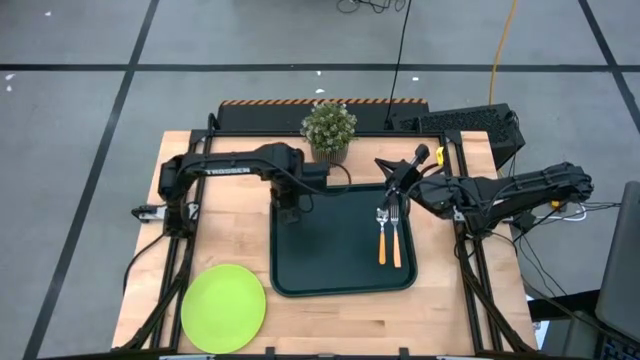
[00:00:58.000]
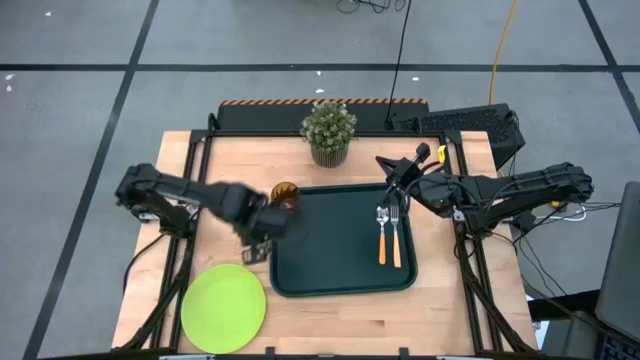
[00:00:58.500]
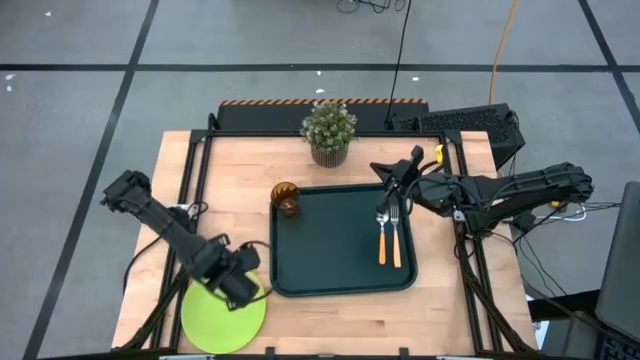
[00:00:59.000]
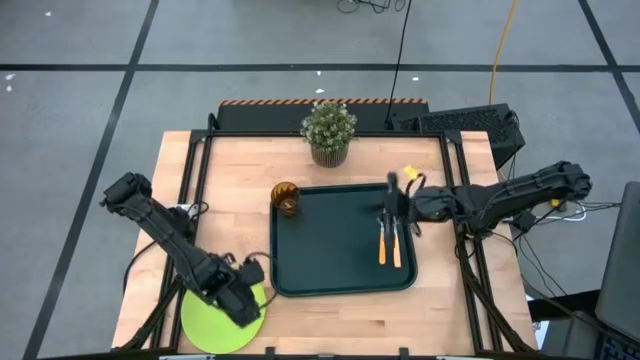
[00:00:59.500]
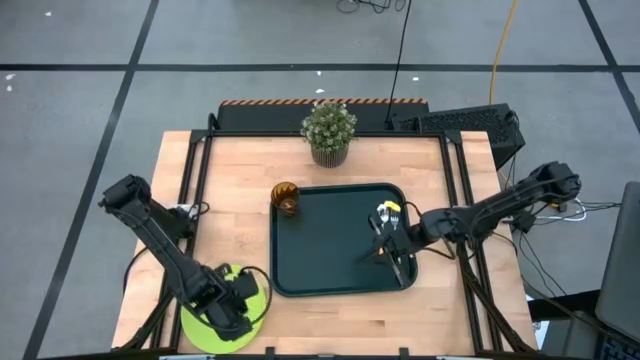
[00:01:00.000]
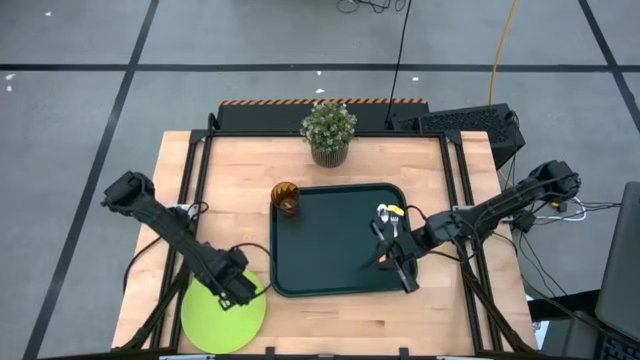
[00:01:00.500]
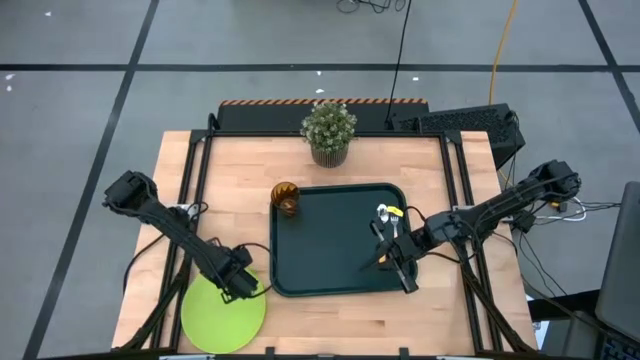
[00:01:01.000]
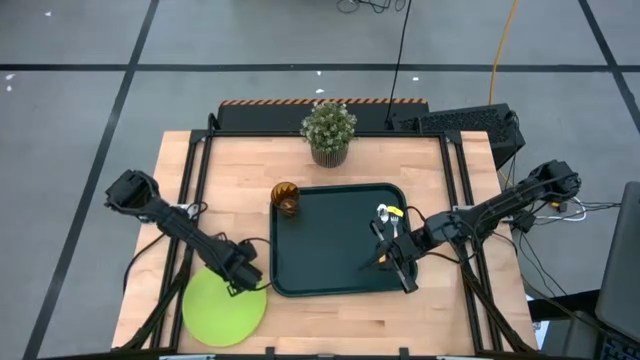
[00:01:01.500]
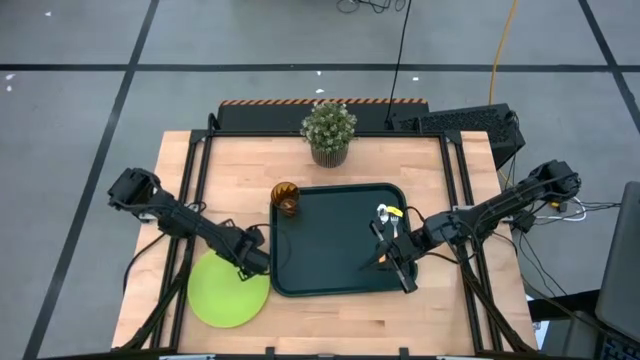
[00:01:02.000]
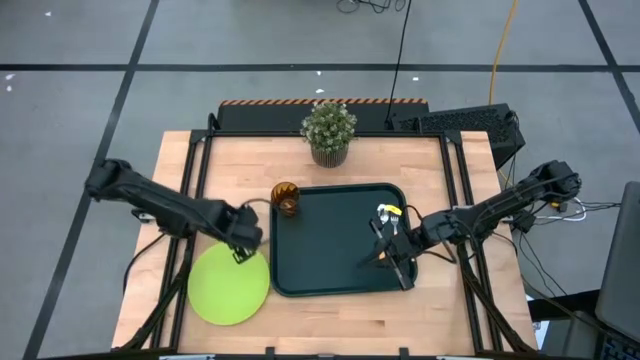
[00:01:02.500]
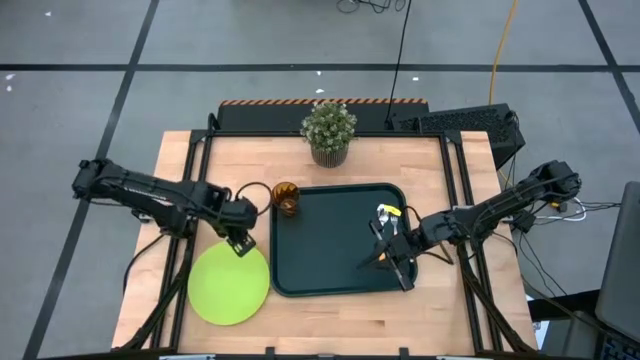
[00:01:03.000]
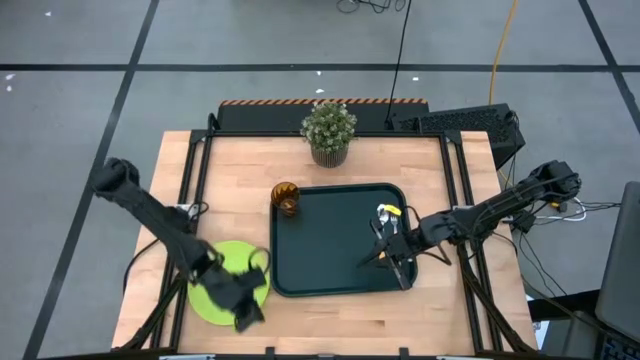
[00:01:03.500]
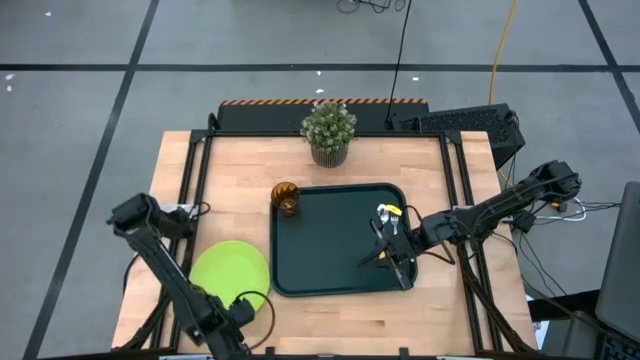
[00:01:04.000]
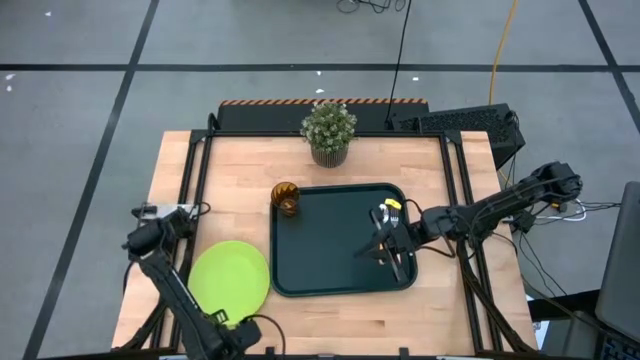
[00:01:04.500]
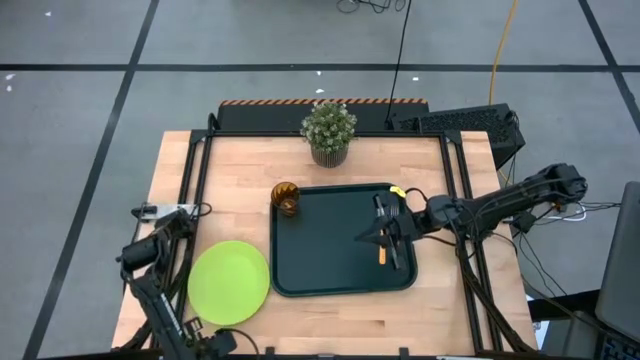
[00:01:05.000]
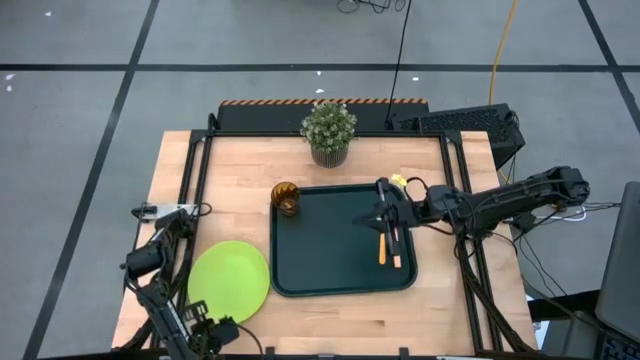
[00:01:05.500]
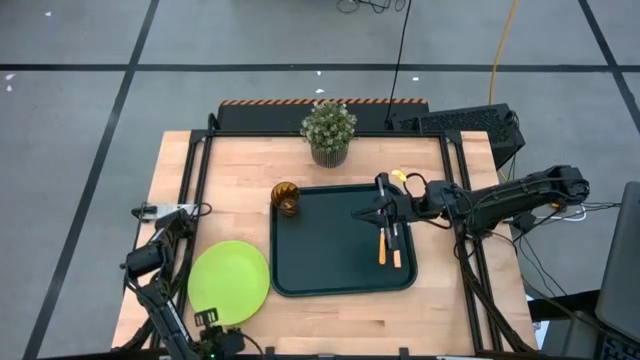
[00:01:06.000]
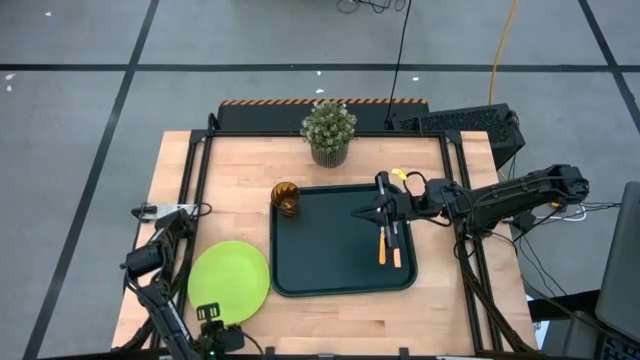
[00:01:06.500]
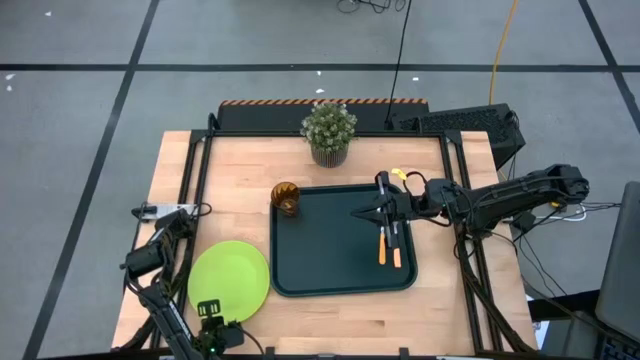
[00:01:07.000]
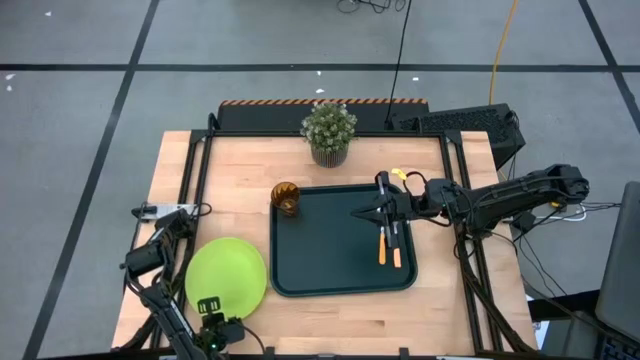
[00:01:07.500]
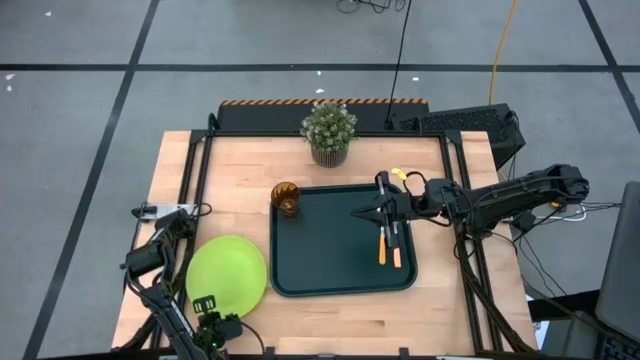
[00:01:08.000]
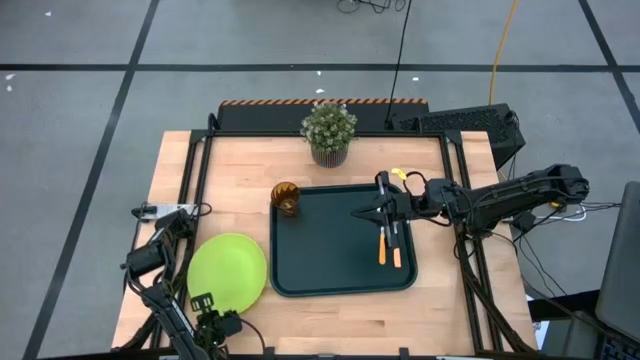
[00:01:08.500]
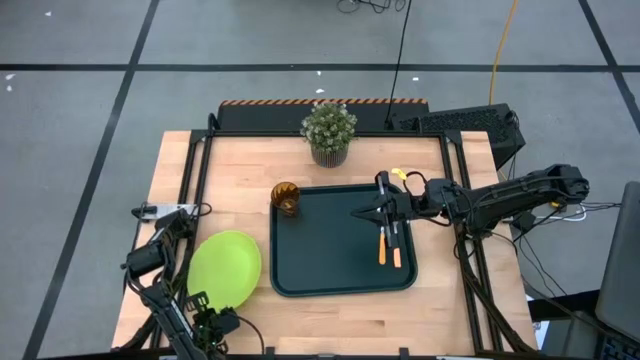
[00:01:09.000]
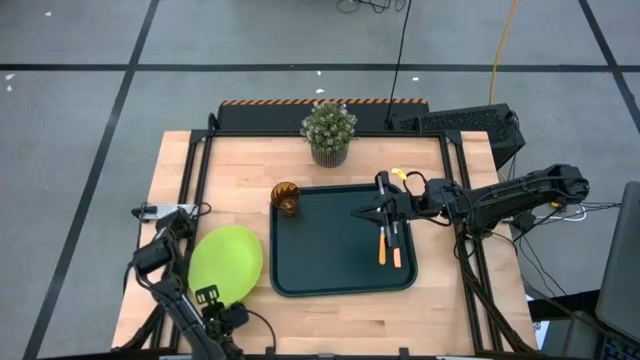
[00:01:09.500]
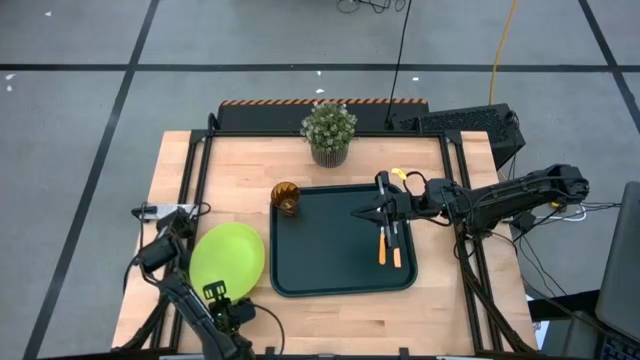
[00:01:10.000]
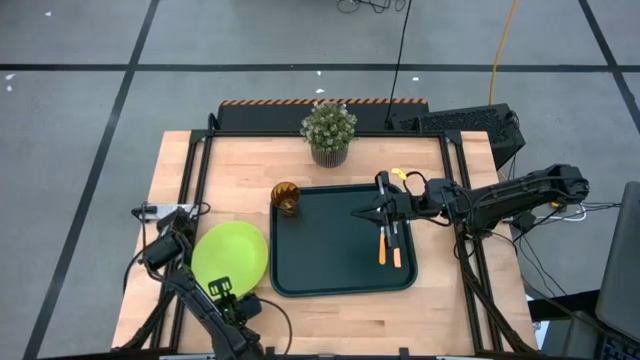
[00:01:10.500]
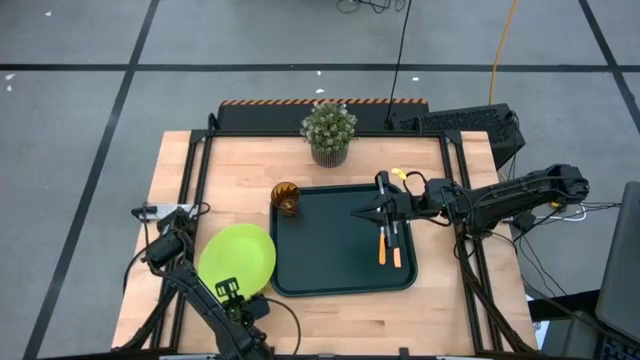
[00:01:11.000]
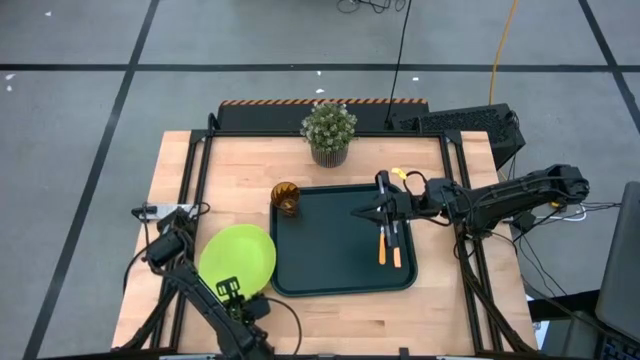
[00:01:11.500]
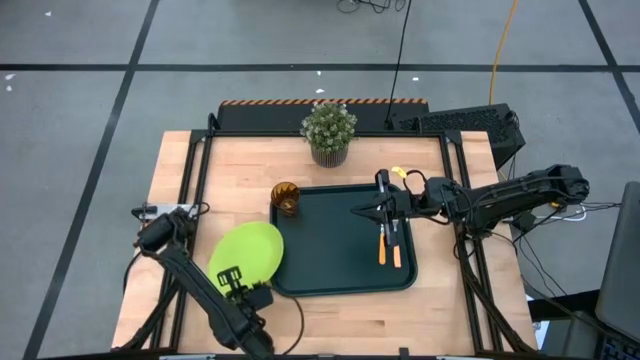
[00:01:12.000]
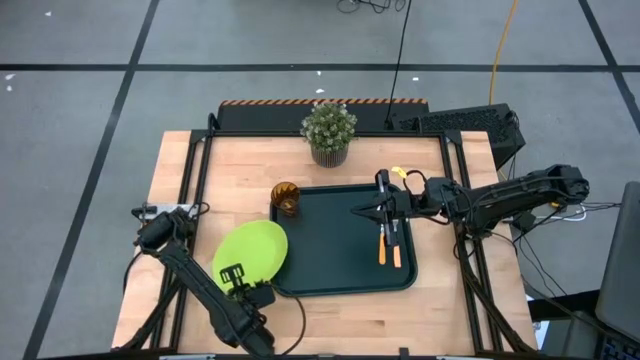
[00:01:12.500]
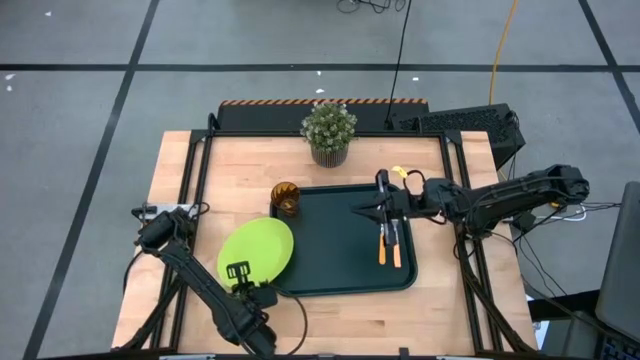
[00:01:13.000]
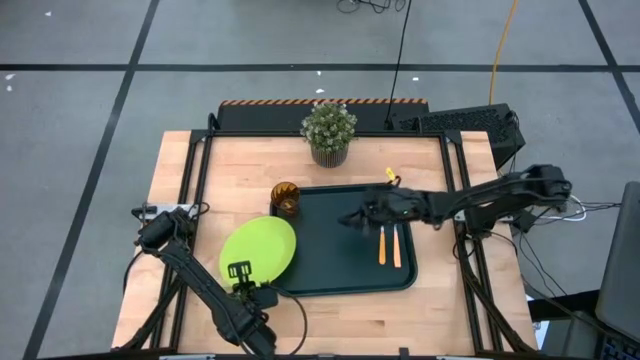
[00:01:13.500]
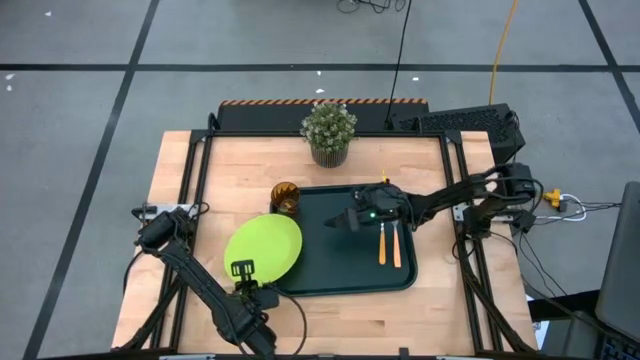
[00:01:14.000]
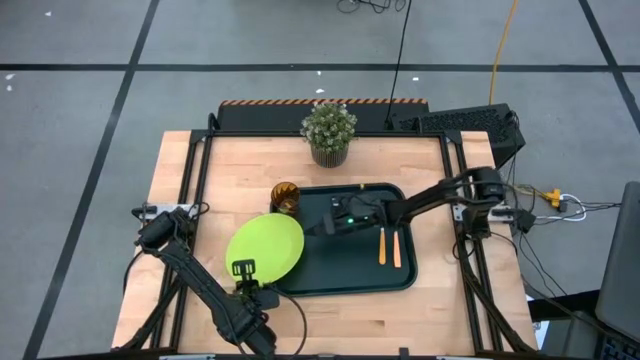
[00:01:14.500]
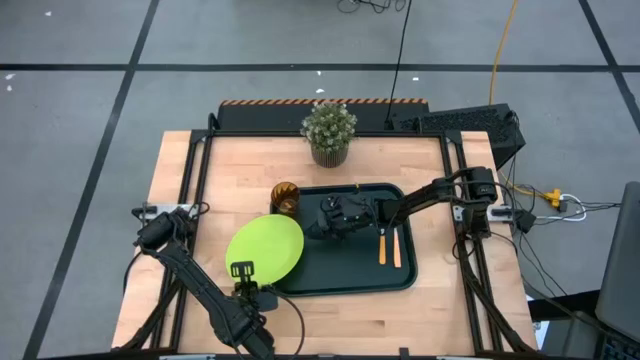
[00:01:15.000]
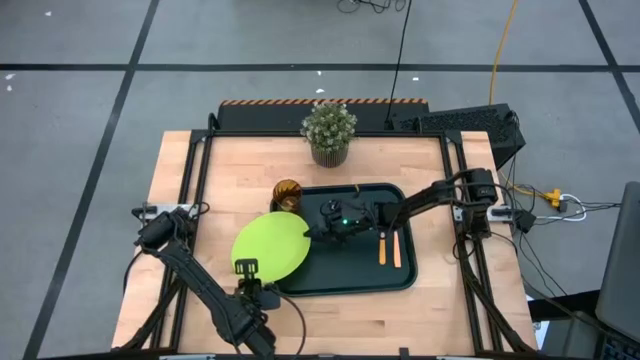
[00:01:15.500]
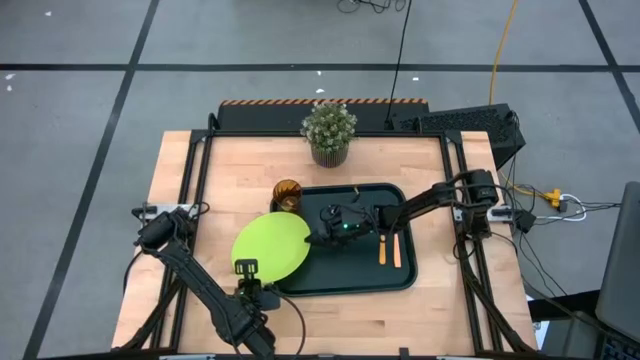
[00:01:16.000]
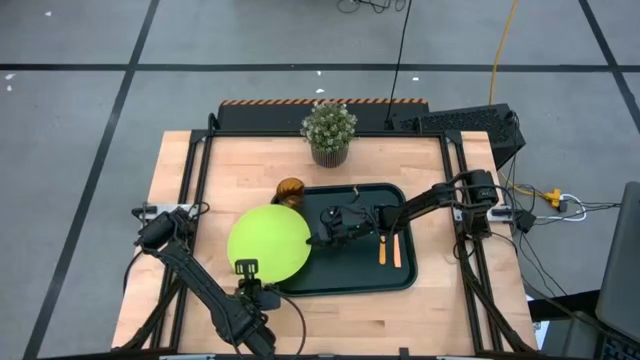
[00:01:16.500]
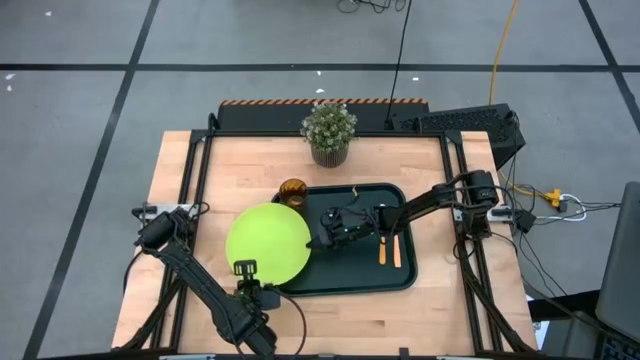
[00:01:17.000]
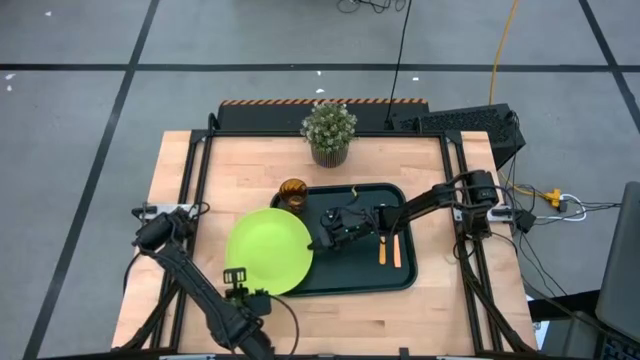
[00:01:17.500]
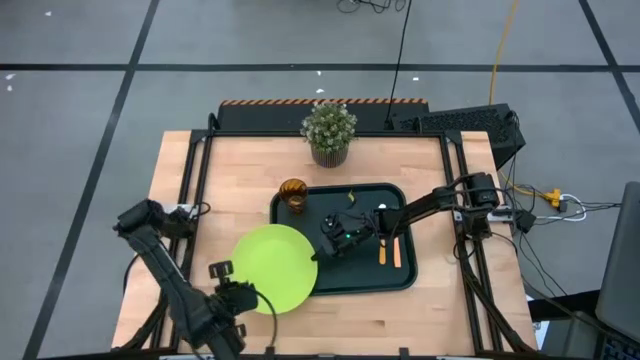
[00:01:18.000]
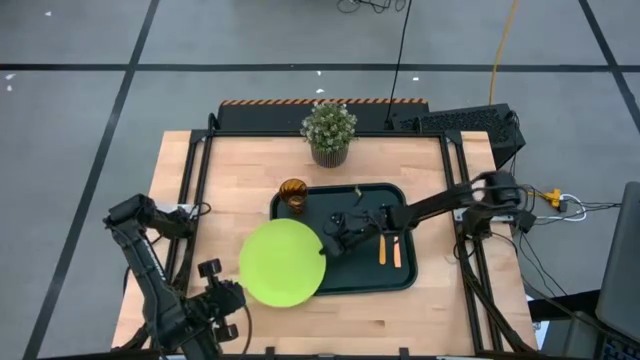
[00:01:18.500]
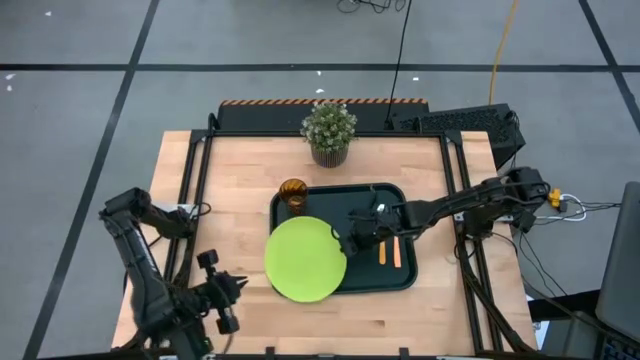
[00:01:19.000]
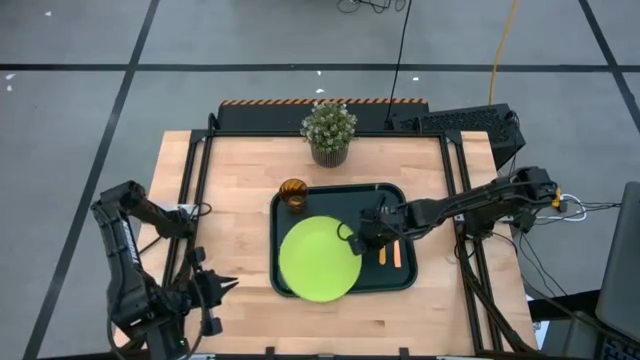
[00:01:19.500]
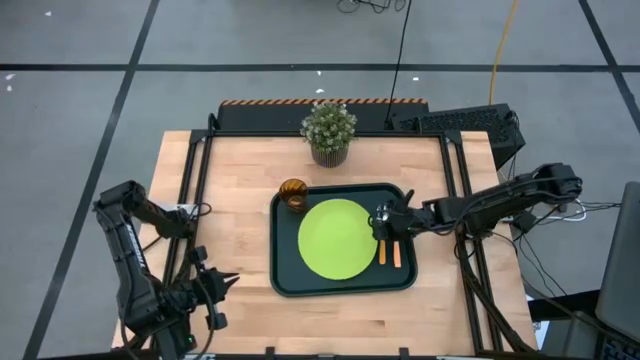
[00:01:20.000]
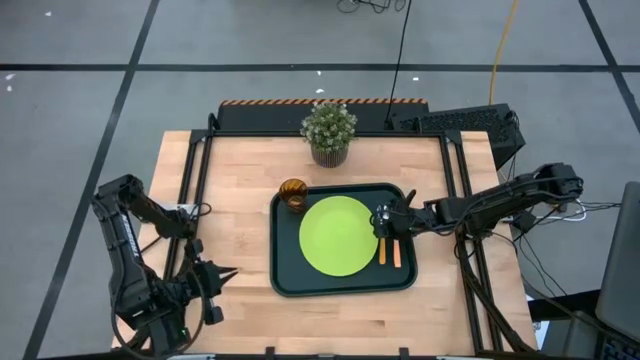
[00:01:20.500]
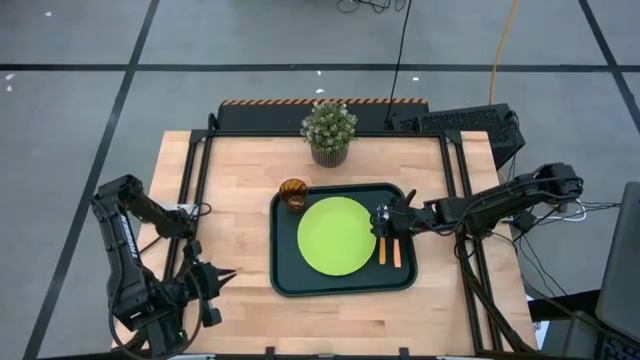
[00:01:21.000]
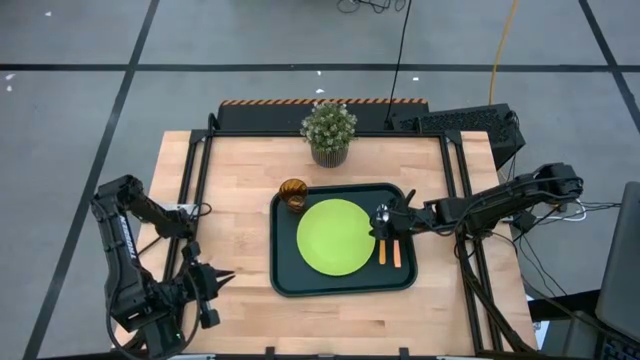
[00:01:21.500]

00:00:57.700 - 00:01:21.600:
Task: Pick and place plate/cup/fork/spoon on tray
Put the plate on the serving tray
